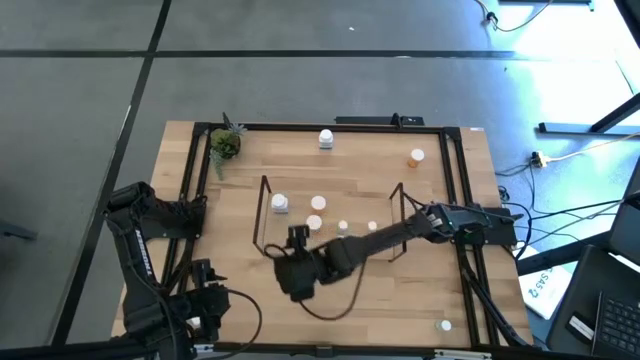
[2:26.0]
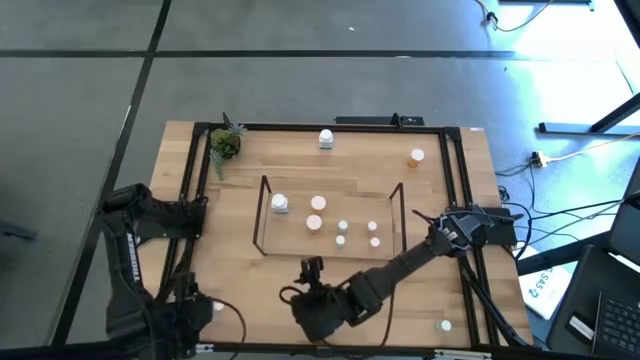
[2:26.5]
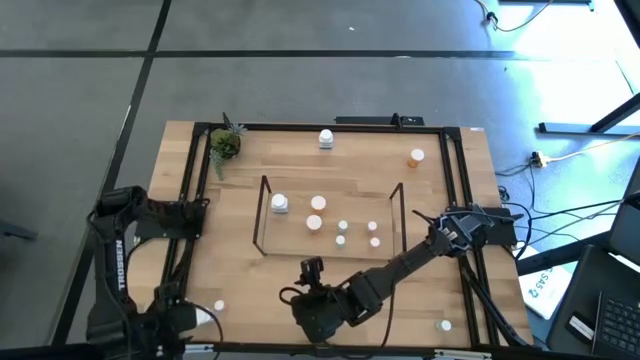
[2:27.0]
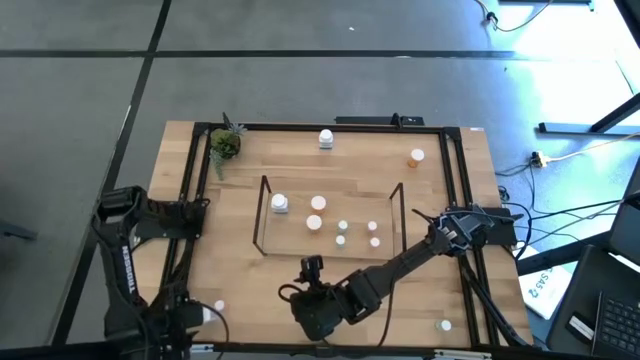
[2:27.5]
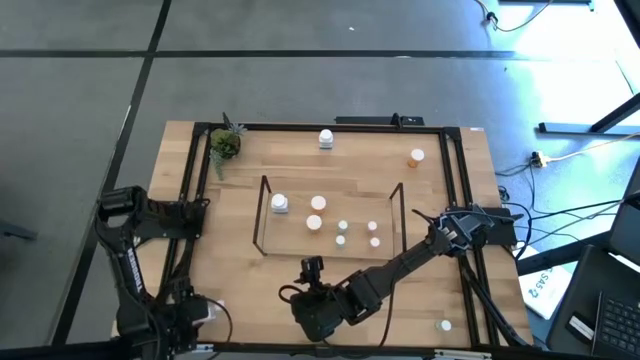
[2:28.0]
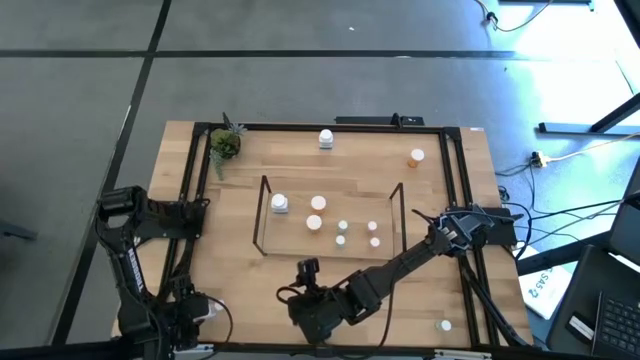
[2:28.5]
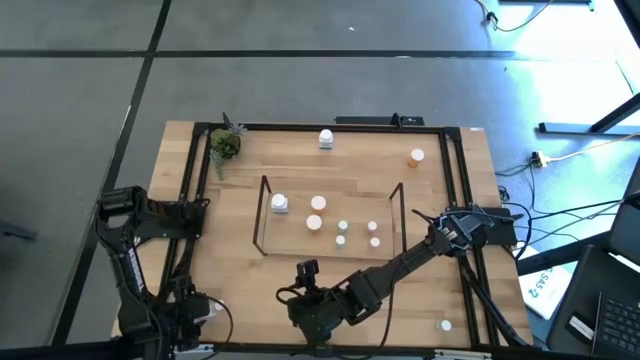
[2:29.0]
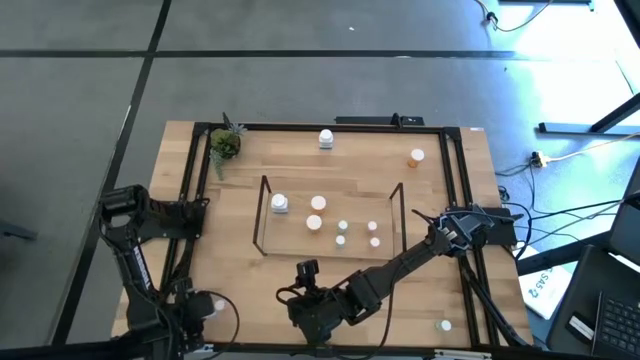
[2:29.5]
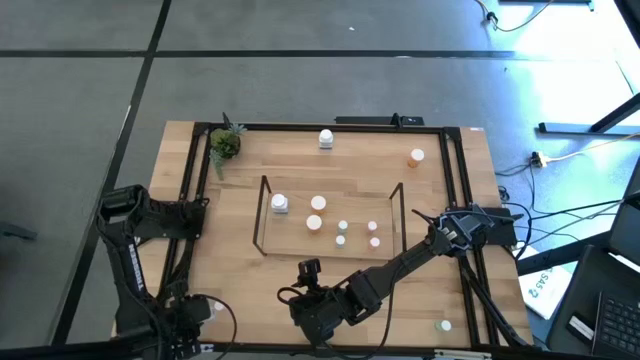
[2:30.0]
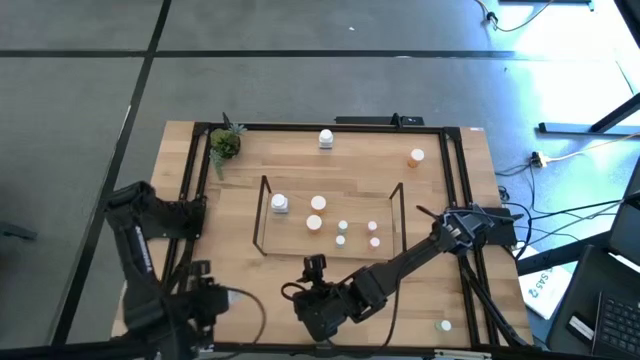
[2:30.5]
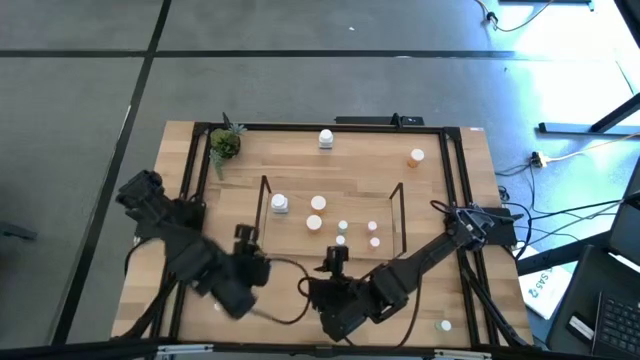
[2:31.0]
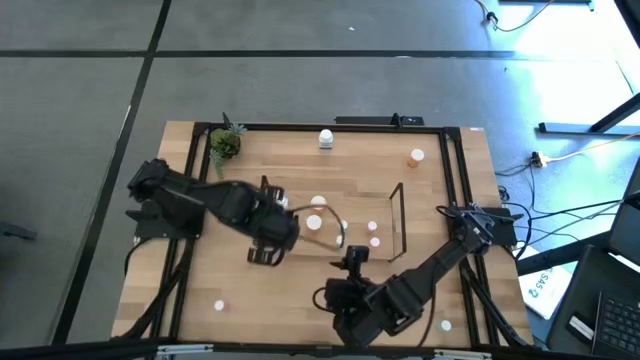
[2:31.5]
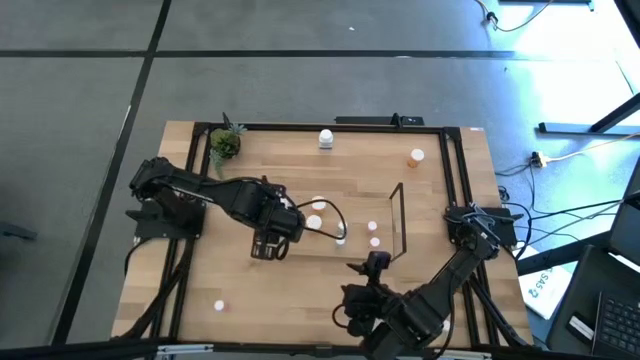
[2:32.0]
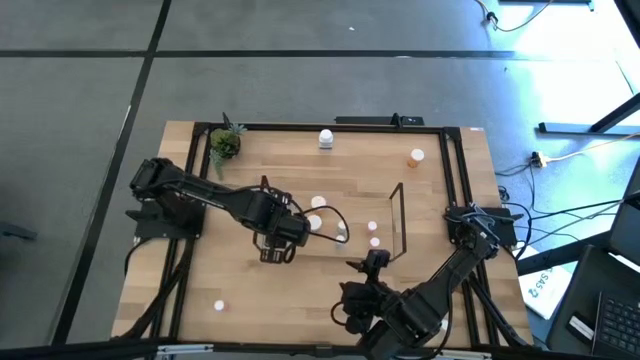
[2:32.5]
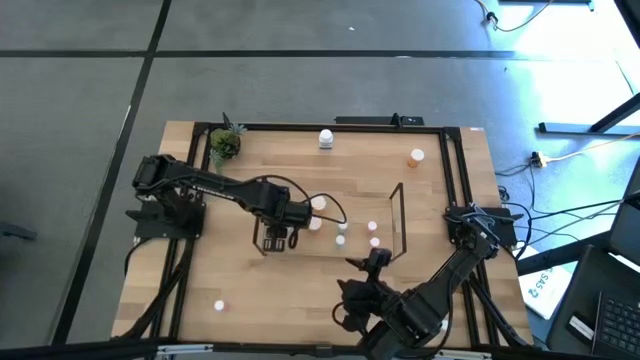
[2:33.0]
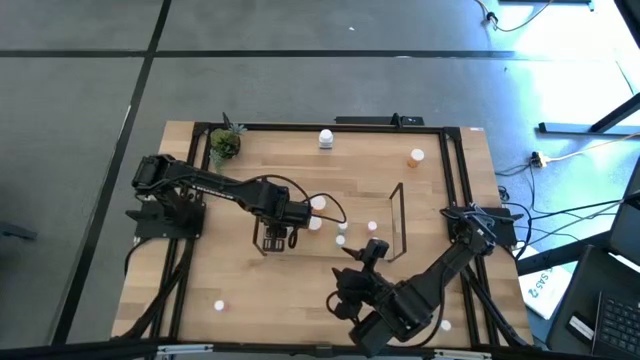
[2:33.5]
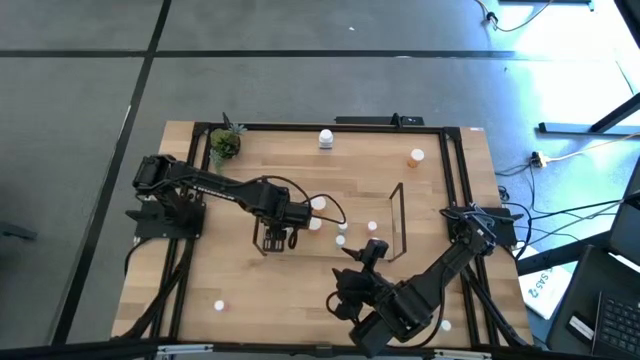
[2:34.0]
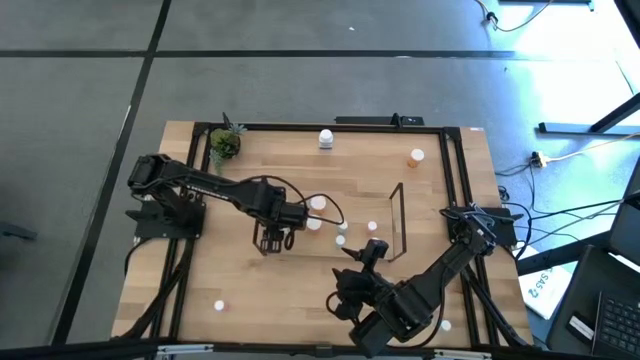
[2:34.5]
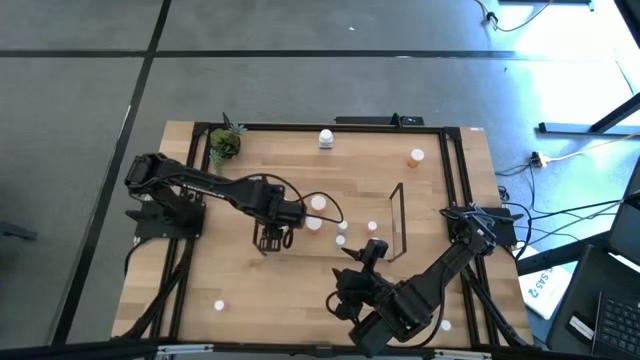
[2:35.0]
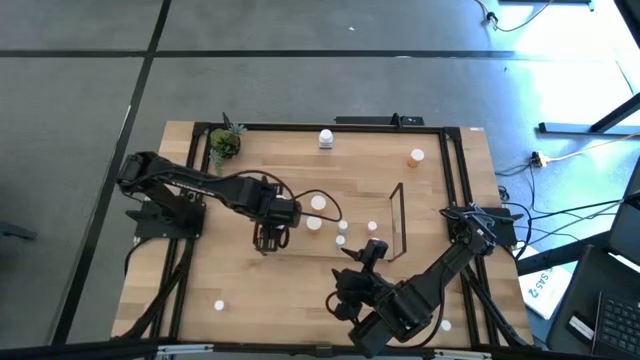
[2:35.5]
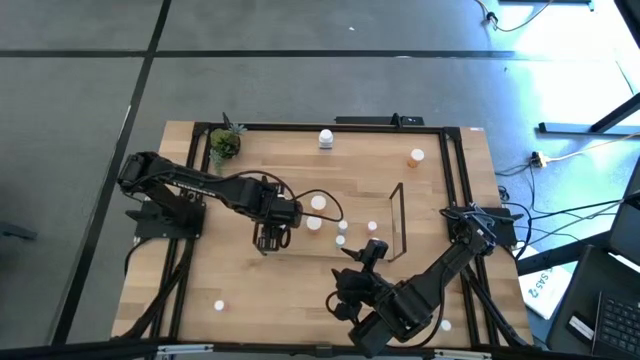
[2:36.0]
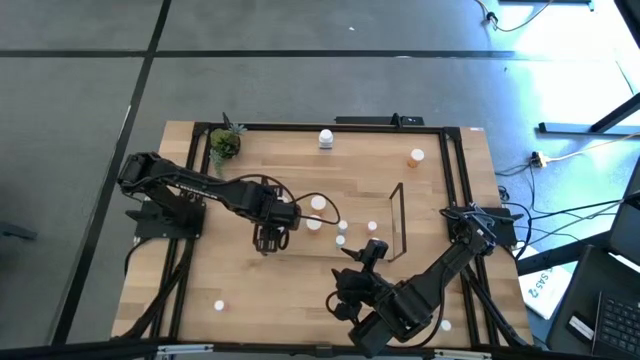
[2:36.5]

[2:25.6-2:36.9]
Task: Pick and place medicine bottles onto shelf by color
Put the bottom white pill bottle on the shelf aligned with the other white pill bottle

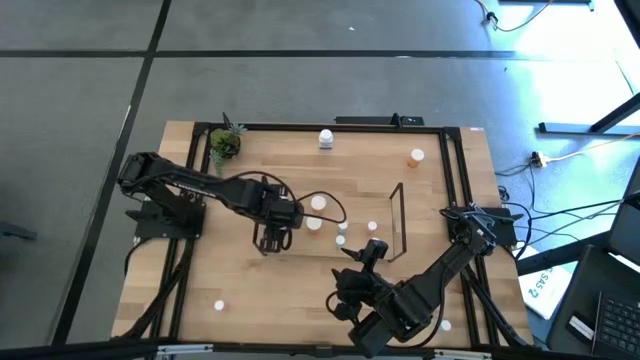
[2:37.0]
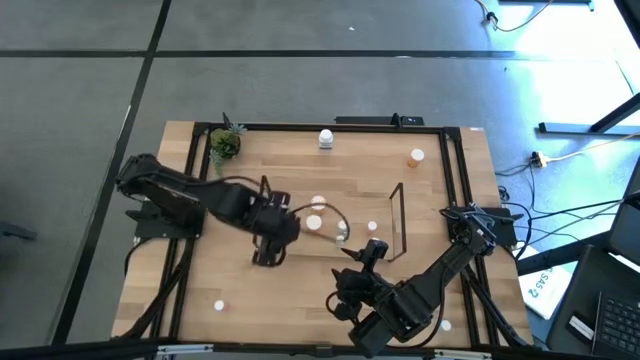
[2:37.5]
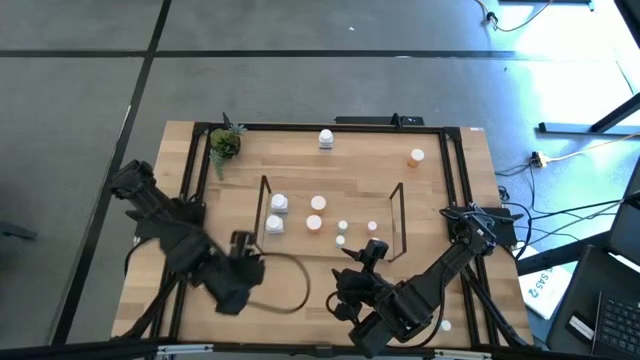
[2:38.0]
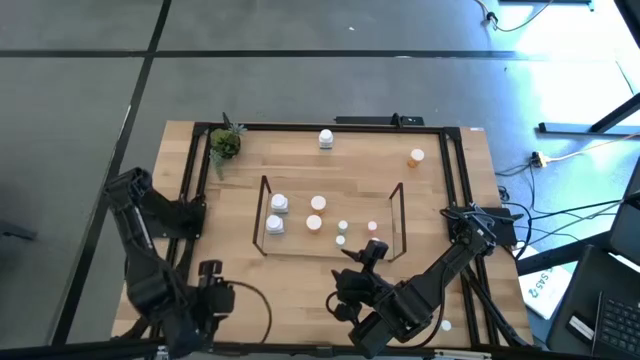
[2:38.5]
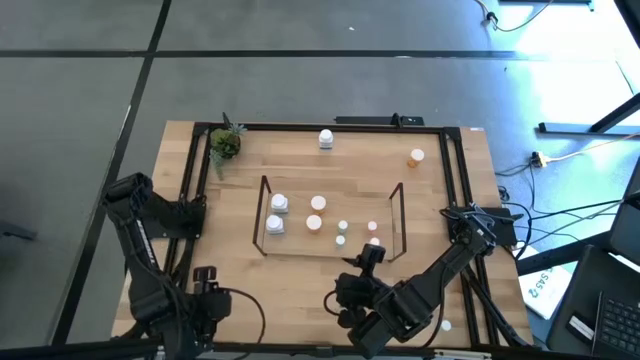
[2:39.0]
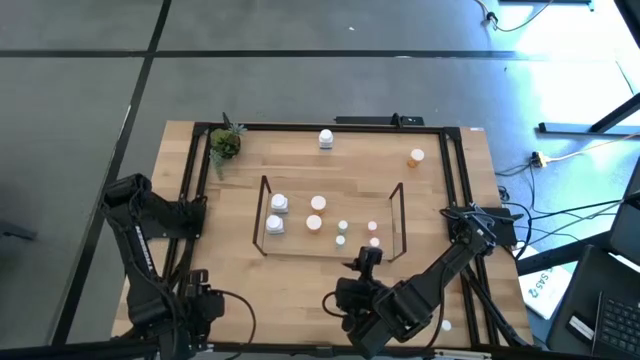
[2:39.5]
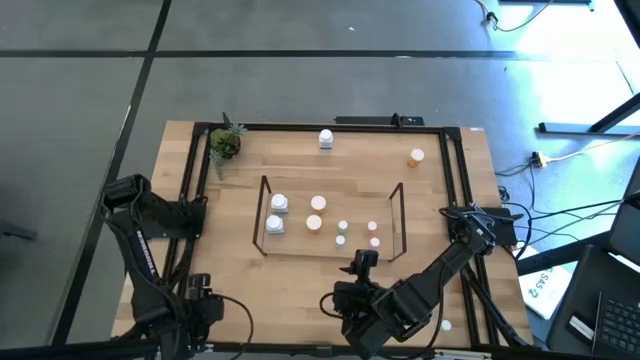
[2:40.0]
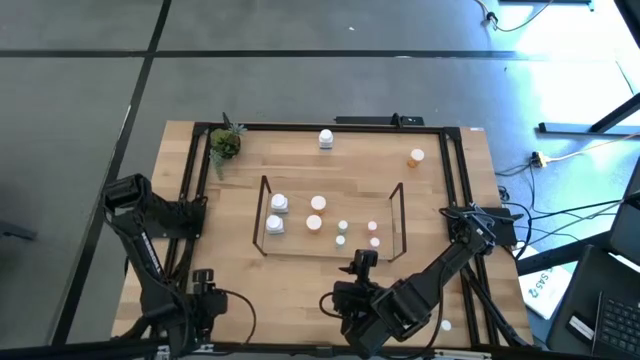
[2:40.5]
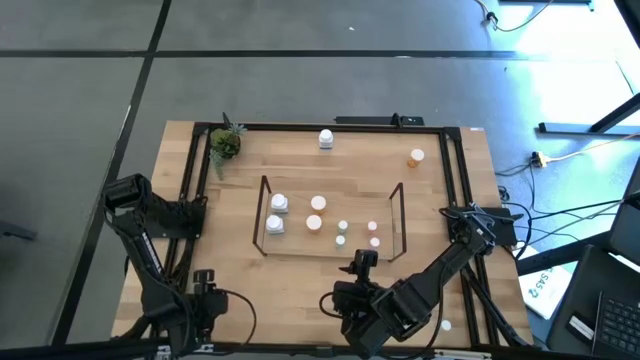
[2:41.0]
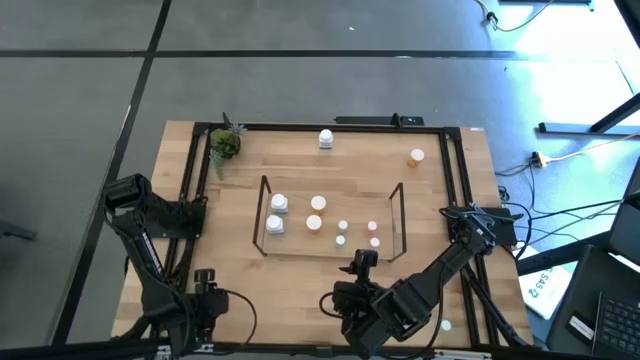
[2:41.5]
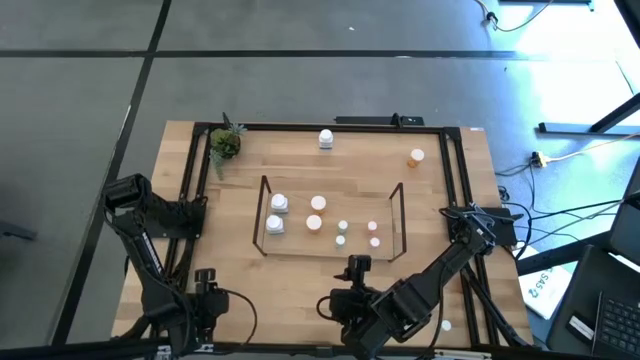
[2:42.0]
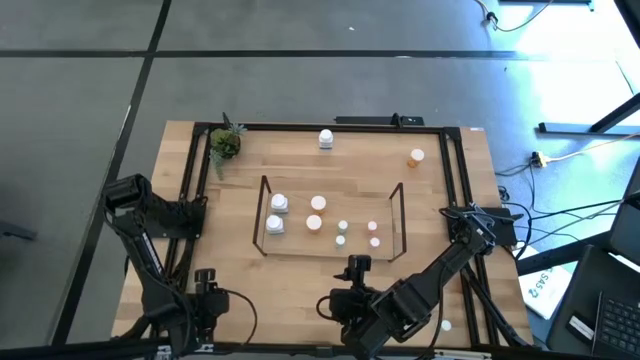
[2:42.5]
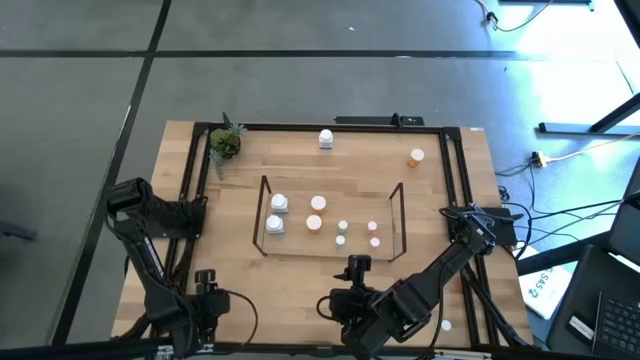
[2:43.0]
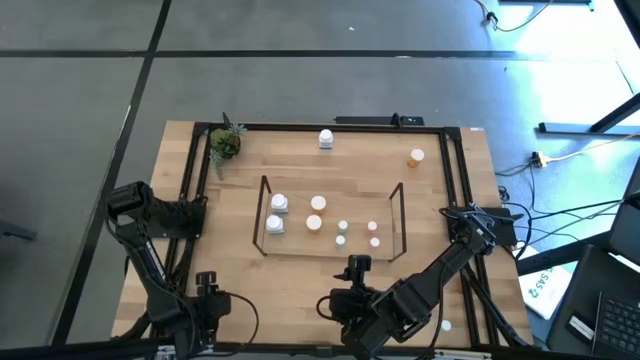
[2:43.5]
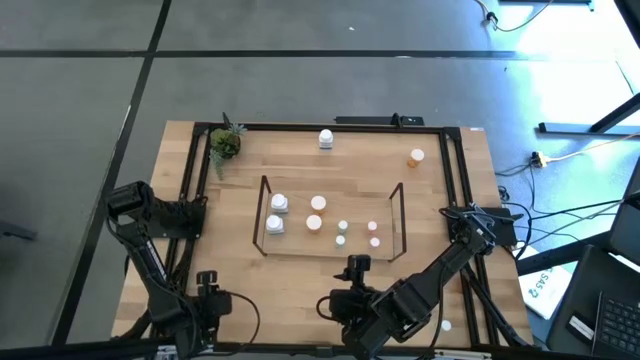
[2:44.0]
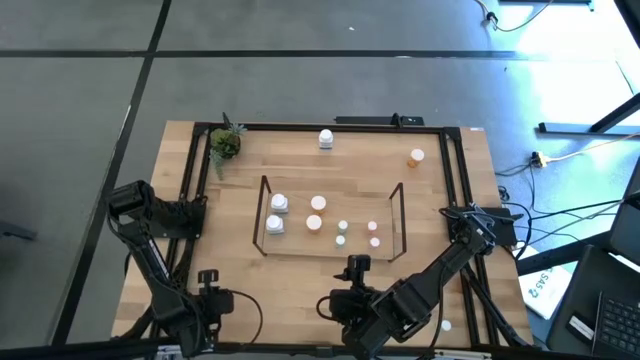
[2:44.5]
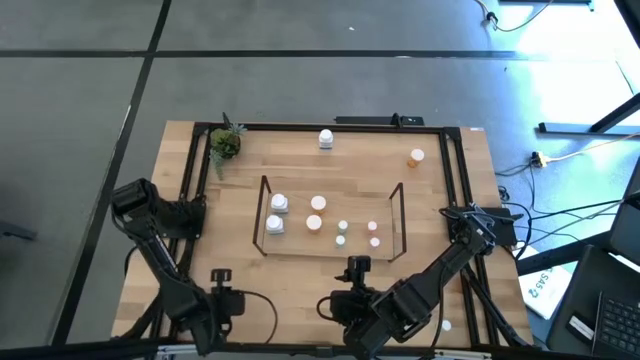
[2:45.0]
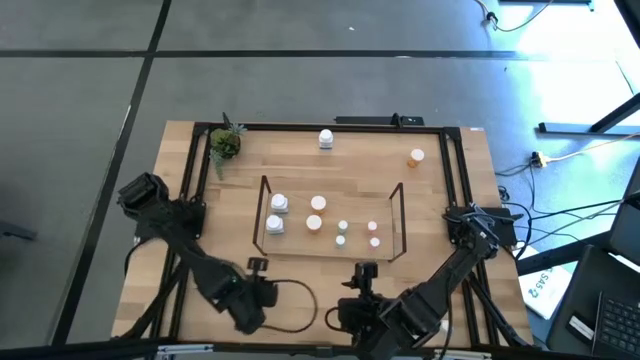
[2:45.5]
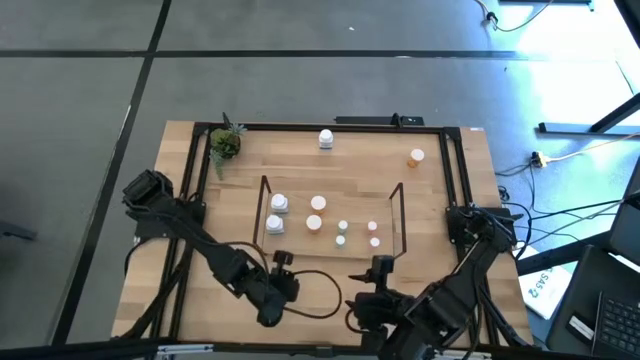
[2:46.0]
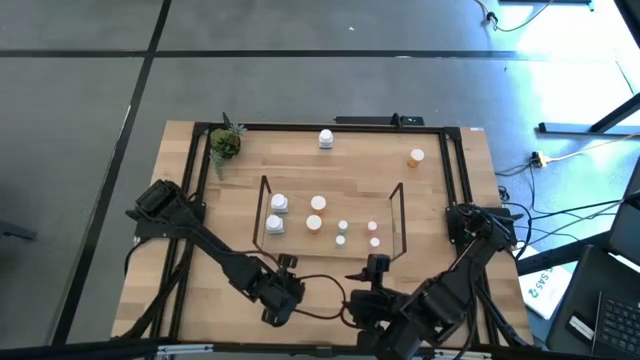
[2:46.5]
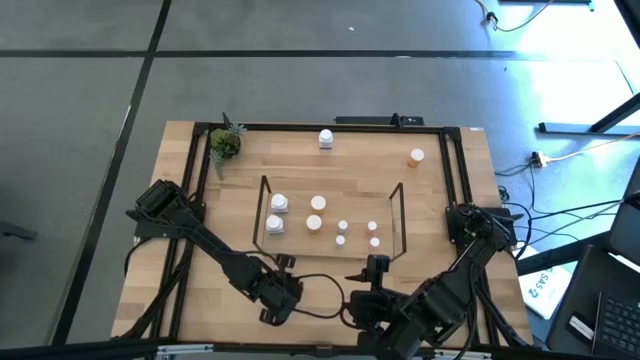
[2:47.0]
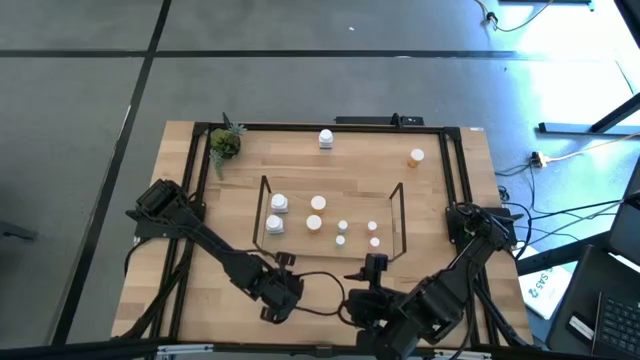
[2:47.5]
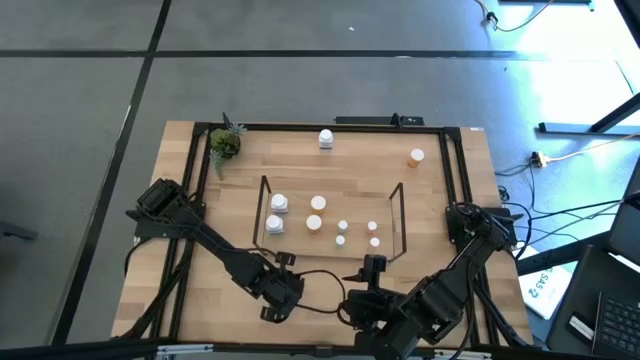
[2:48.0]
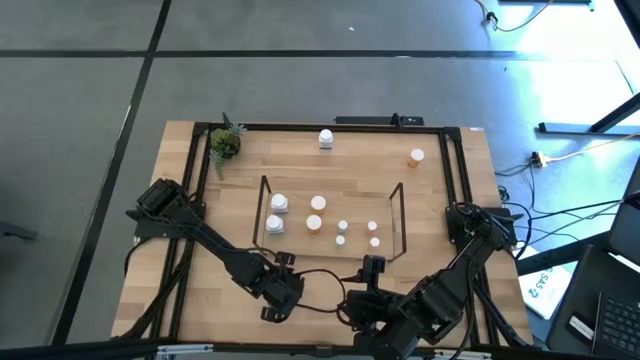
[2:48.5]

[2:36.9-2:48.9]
Move the pink bottle on the table
